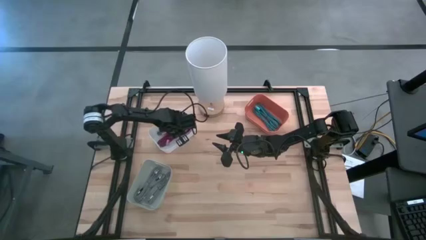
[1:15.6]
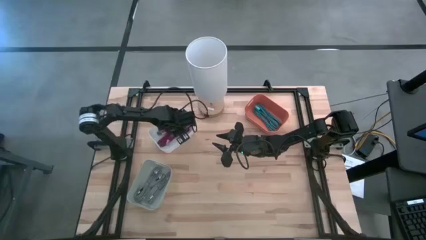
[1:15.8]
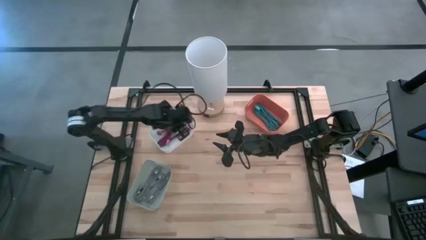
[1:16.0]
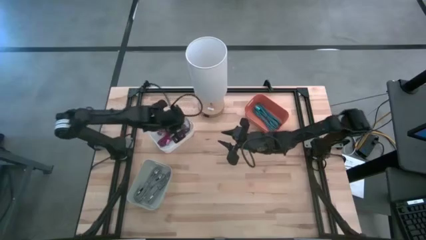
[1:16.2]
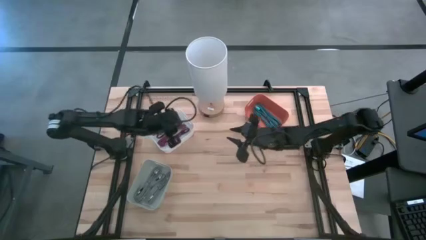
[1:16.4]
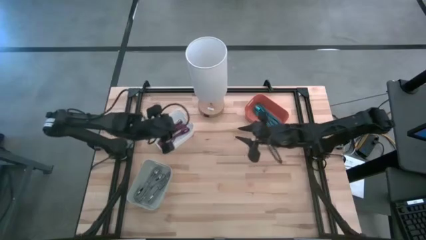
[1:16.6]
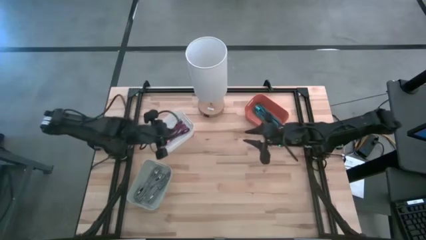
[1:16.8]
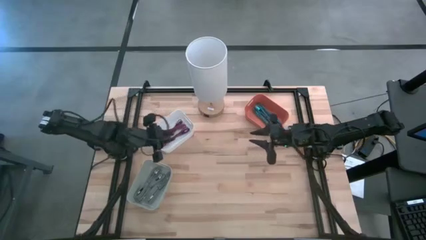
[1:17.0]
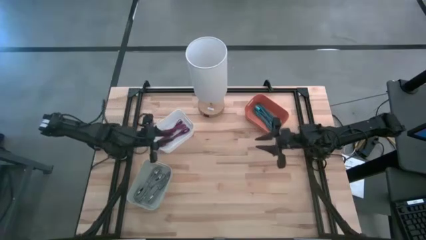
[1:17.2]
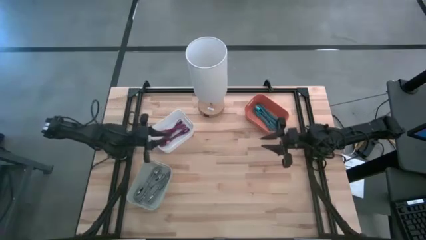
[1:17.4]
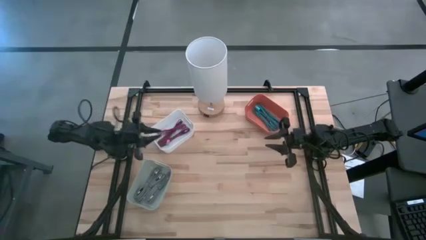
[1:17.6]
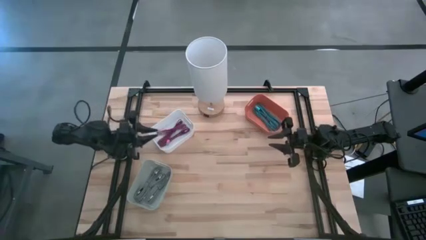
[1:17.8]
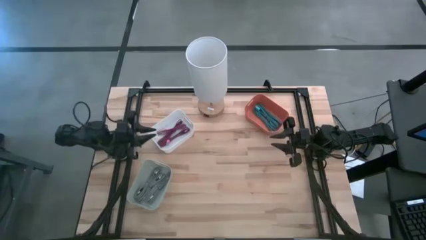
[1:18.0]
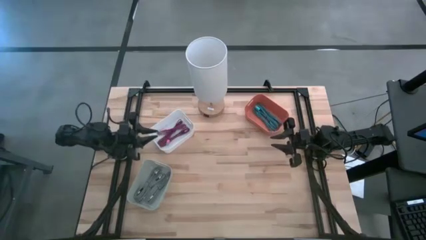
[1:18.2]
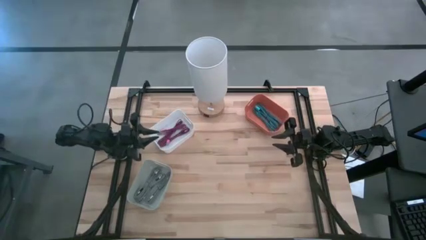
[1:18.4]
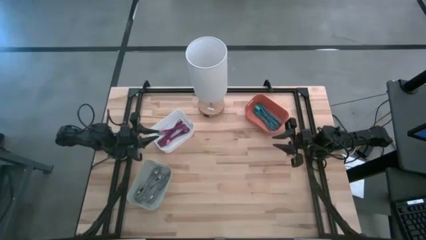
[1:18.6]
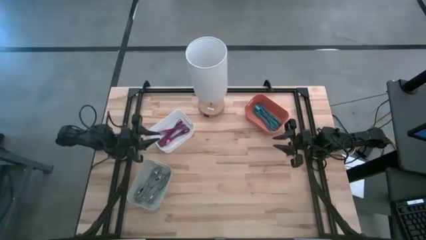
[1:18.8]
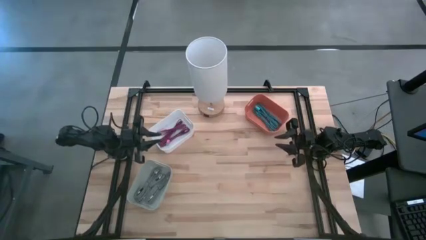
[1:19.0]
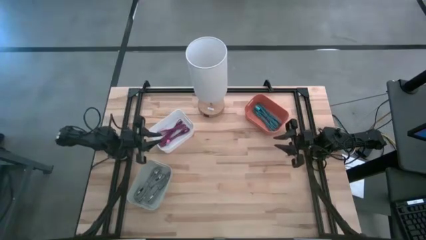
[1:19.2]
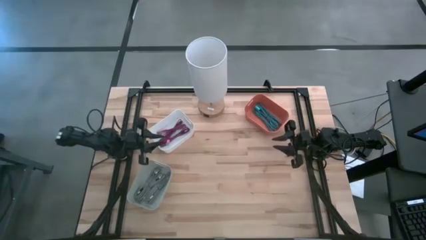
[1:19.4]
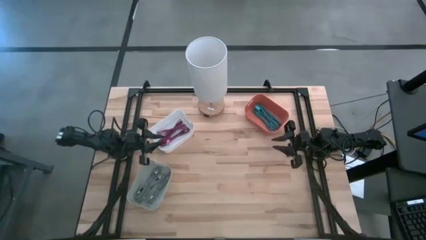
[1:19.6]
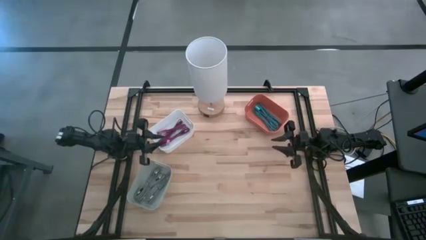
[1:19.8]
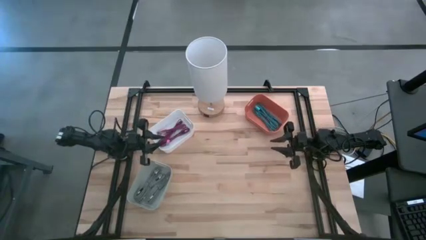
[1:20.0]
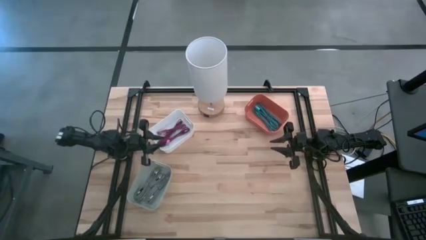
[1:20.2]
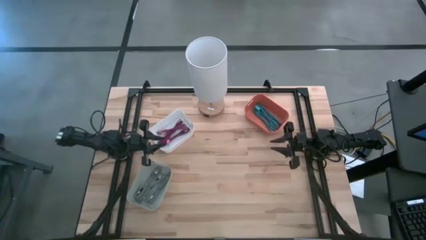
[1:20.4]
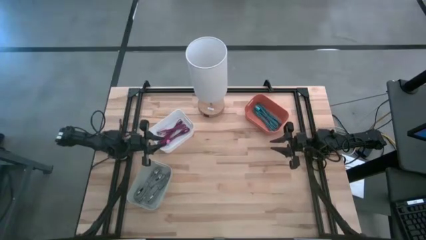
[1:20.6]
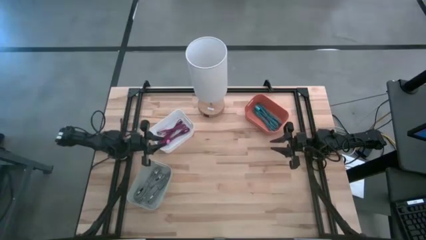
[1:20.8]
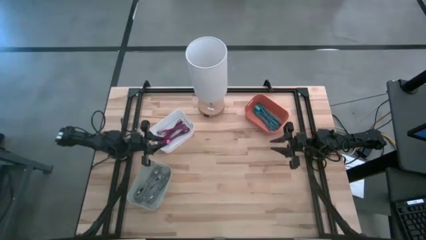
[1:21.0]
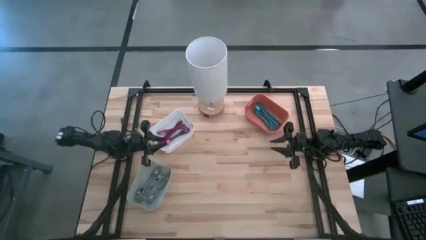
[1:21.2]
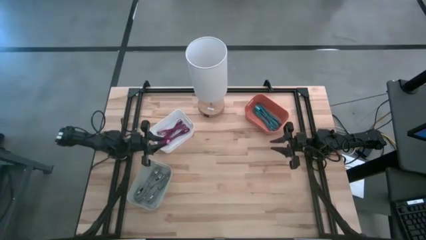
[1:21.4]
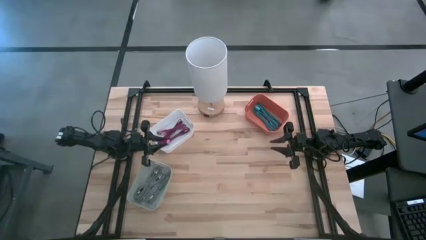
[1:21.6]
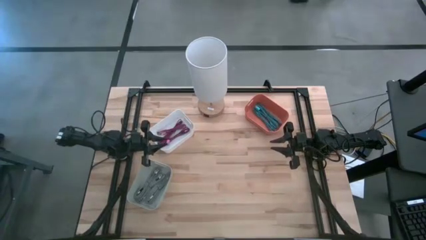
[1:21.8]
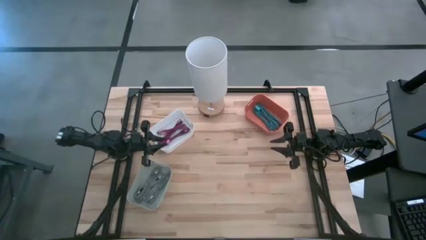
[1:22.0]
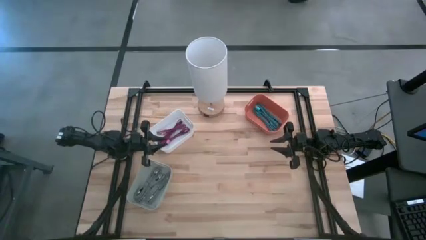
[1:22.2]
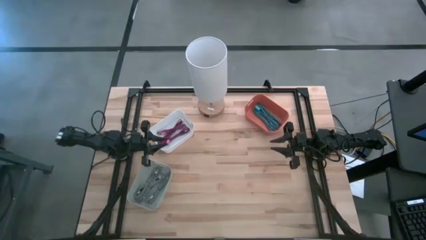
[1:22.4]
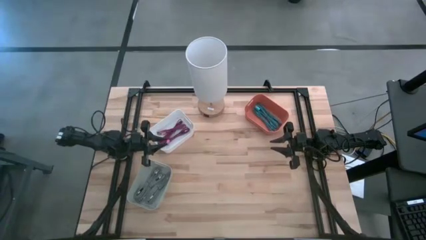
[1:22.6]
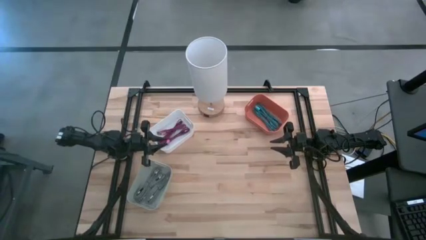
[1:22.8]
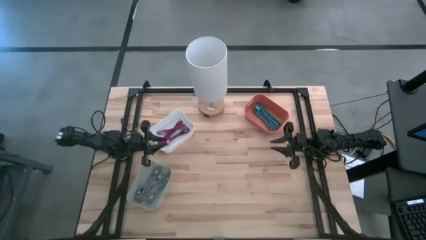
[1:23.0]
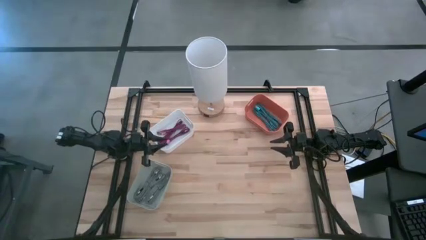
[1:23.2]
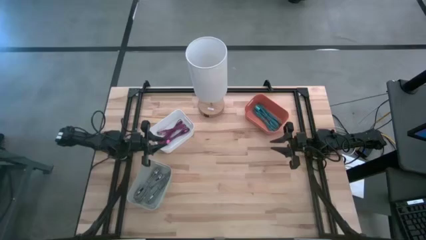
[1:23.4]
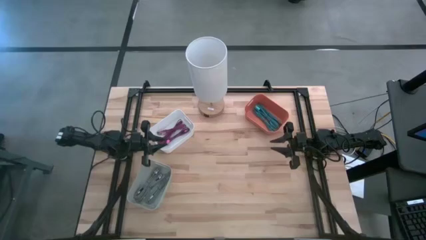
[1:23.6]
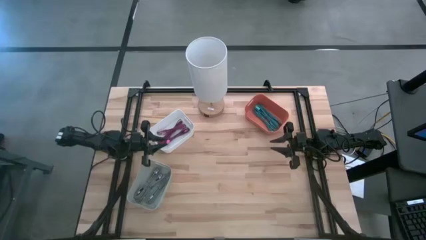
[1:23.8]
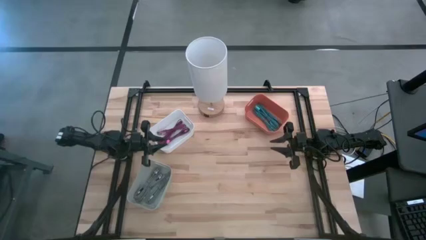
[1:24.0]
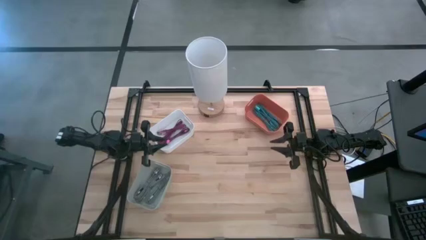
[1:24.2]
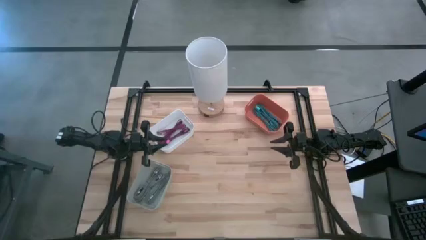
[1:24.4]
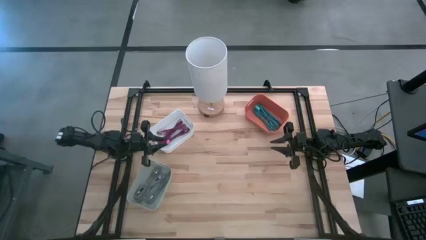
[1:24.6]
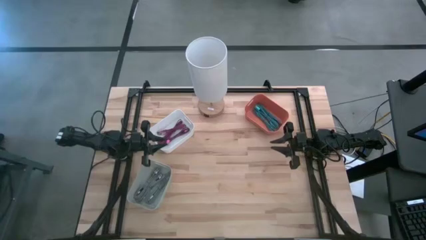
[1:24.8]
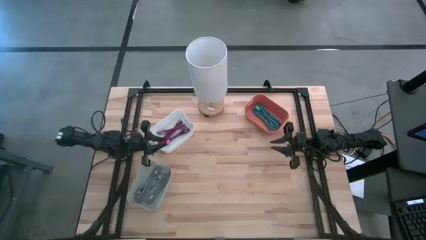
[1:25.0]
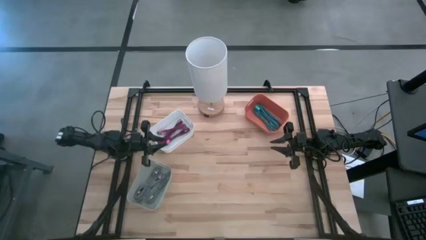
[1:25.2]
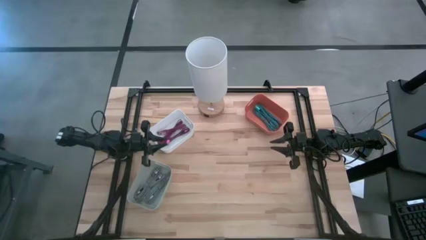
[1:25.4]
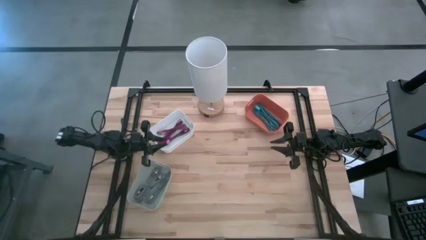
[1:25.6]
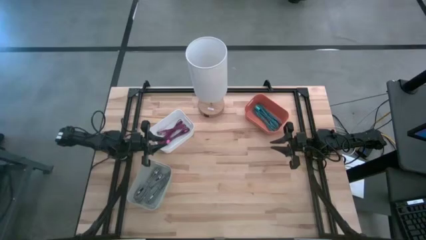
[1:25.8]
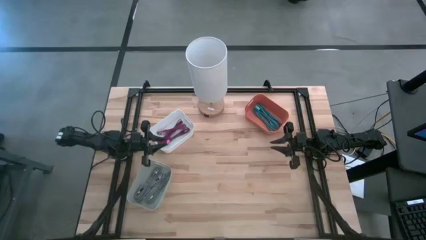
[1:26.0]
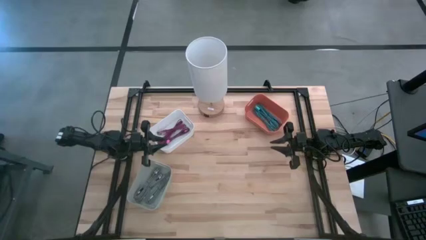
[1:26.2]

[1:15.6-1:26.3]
Task: Pick & Place USB Port
Return to Home Position

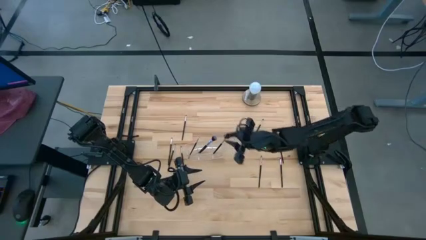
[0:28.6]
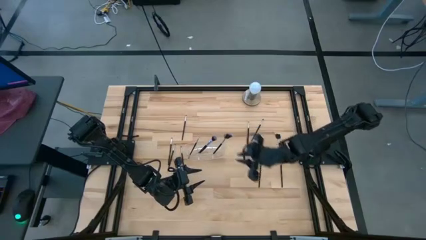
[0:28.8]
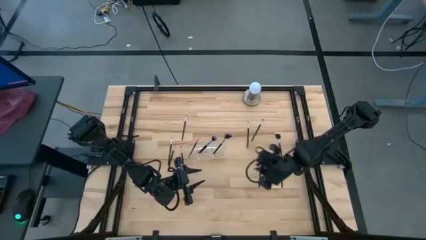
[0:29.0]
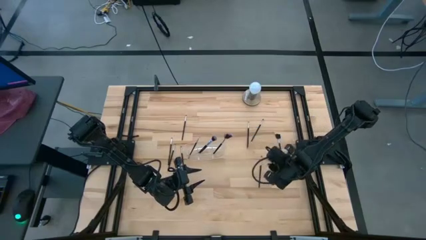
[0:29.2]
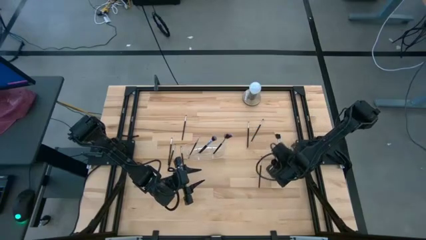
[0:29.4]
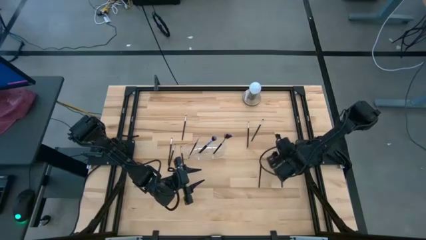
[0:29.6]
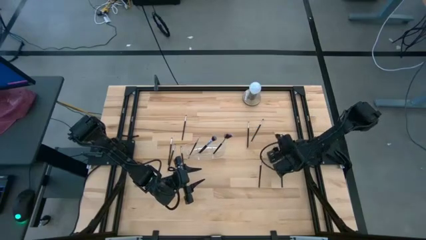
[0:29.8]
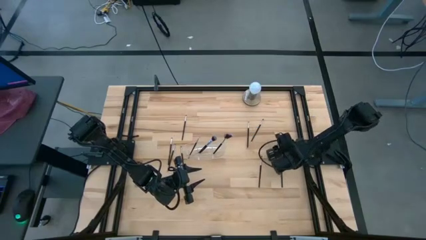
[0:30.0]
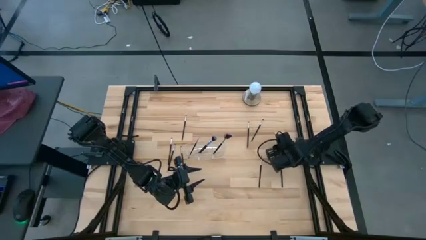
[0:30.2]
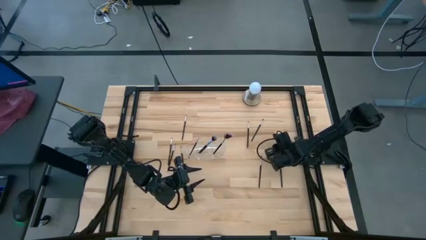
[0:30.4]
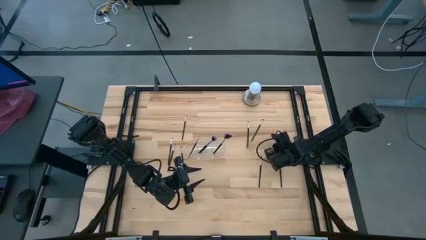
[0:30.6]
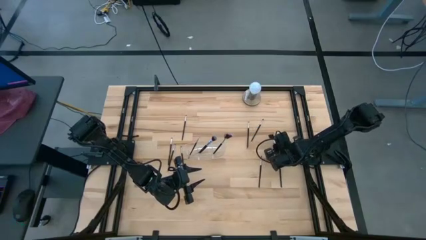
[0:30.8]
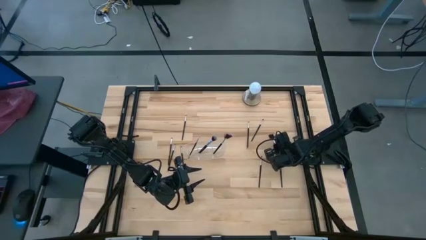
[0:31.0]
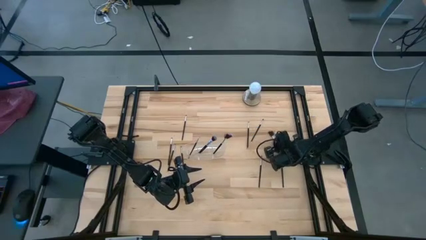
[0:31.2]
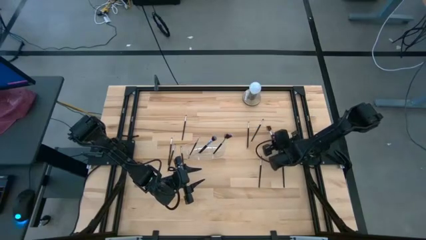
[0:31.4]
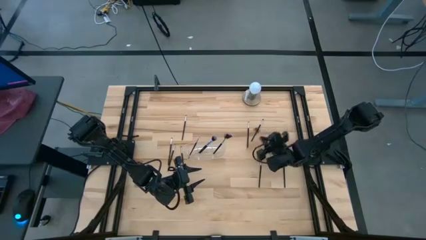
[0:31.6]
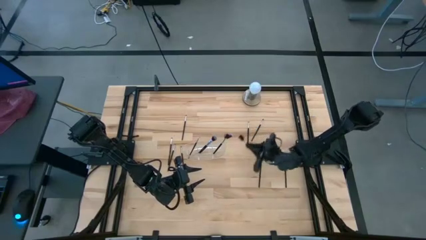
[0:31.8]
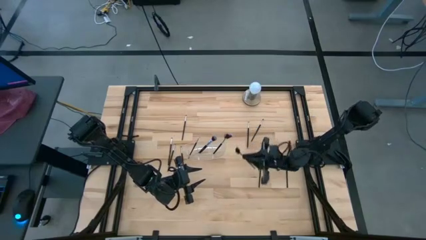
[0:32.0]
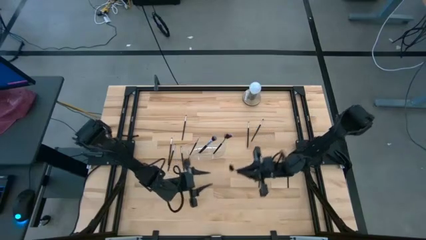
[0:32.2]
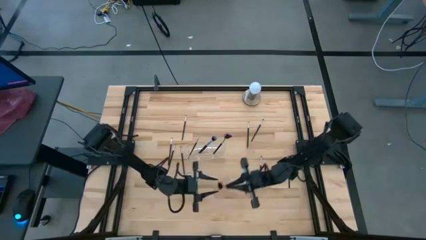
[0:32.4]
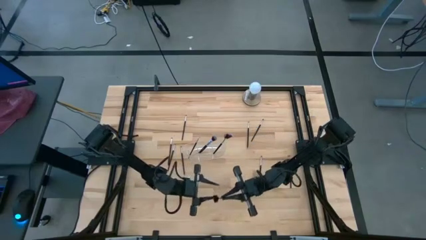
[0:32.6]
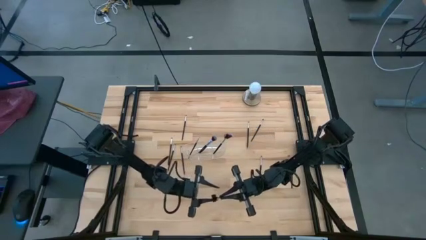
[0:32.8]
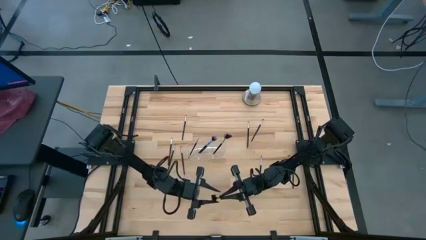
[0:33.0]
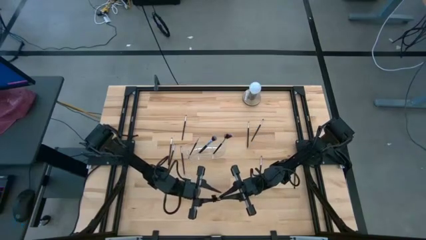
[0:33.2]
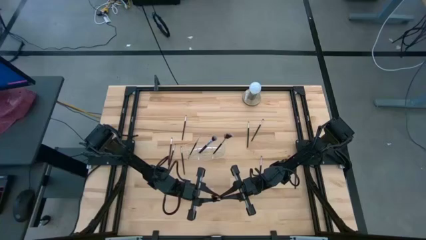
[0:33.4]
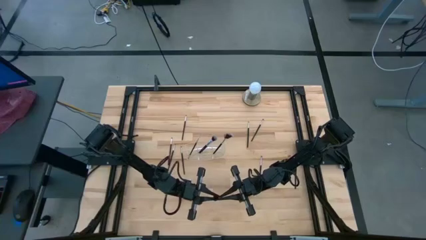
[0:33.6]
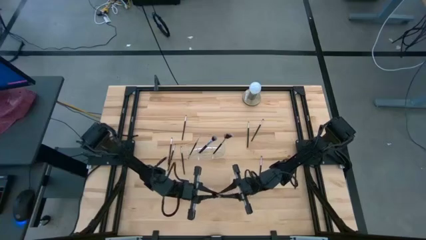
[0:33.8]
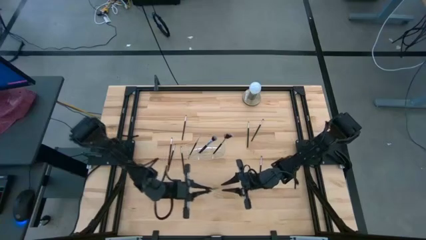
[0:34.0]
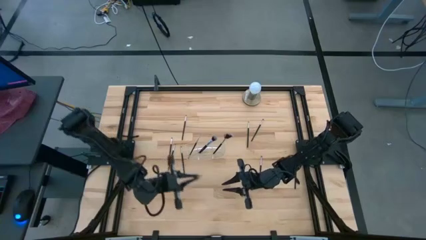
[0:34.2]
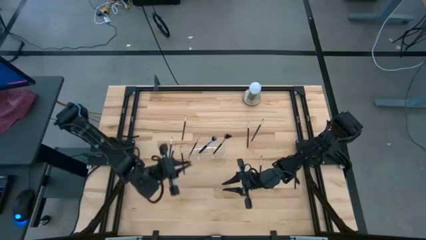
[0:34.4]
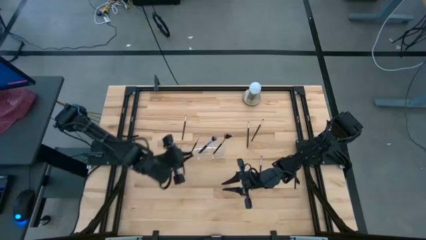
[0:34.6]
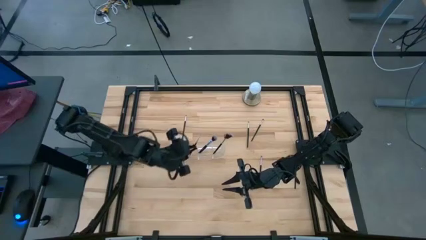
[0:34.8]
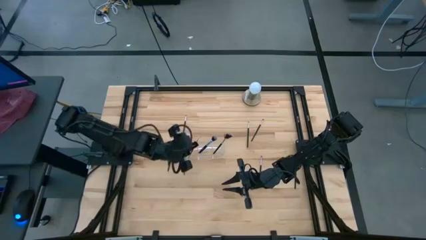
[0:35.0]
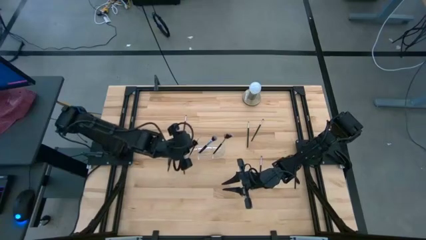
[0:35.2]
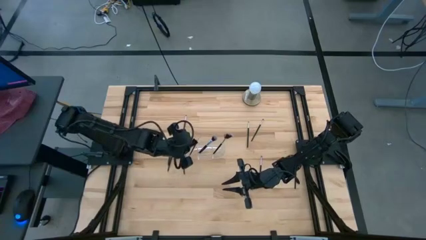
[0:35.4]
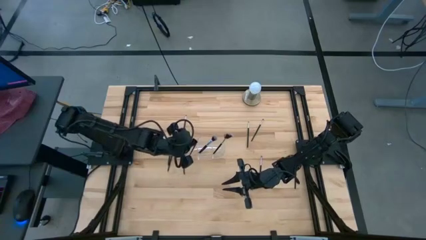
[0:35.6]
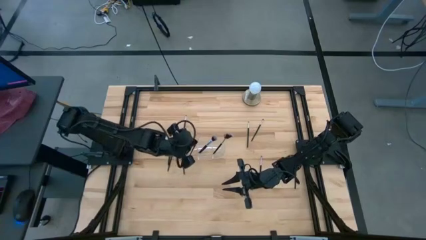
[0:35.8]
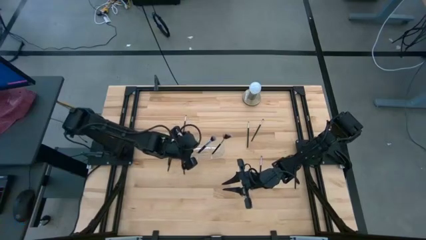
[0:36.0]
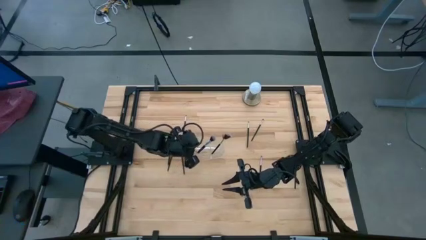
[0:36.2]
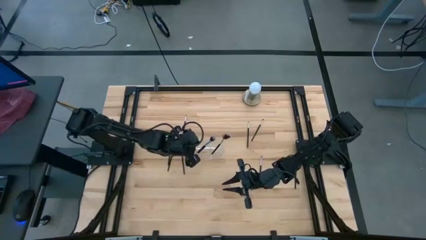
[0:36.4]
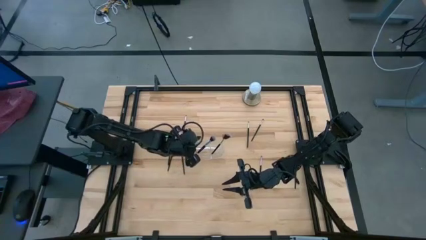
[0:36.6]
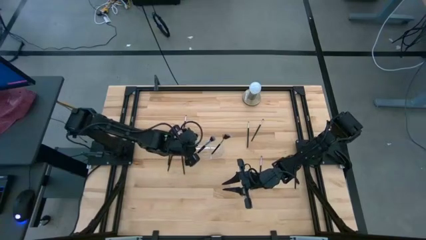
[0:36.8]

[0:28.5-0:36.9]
Task: Put items in baskets/containers
Put the eye groomer brush into the transparent organizer
